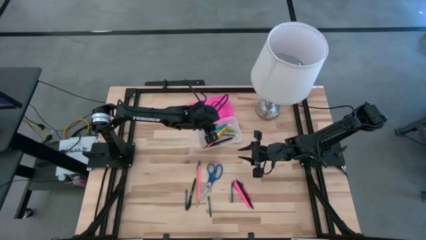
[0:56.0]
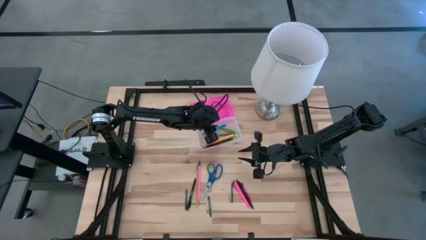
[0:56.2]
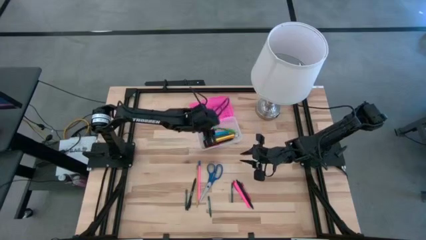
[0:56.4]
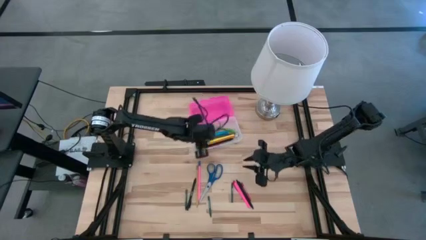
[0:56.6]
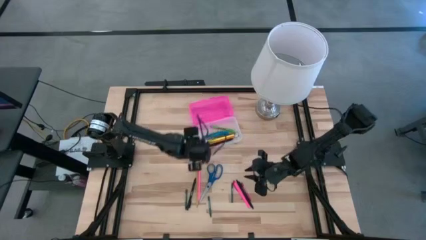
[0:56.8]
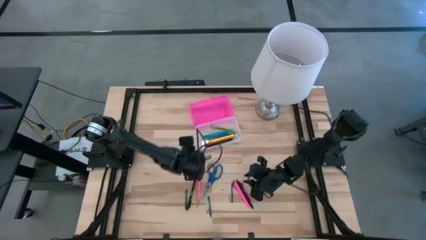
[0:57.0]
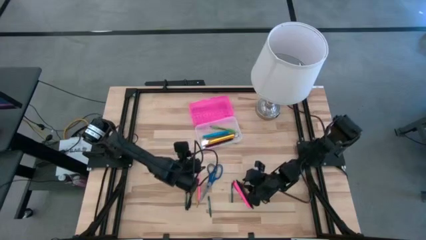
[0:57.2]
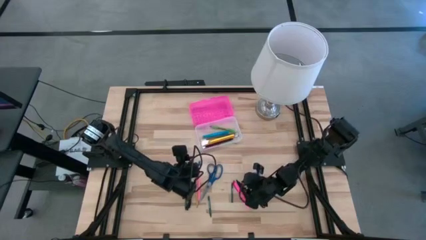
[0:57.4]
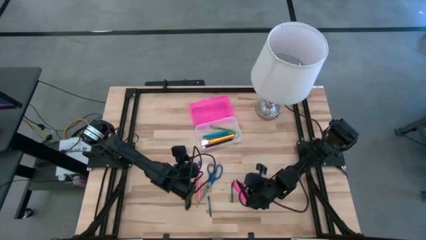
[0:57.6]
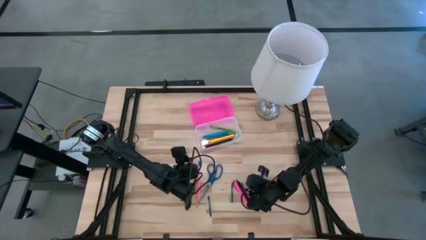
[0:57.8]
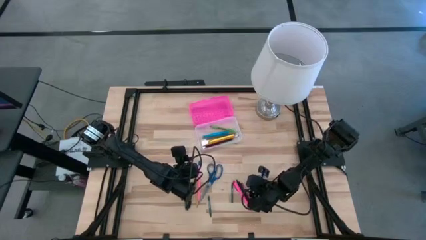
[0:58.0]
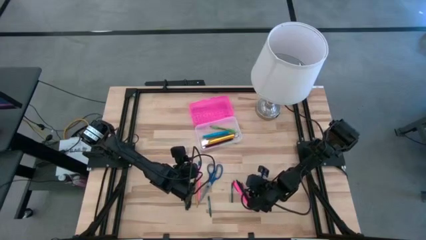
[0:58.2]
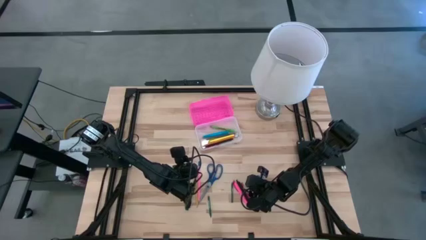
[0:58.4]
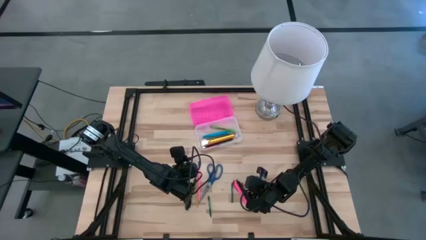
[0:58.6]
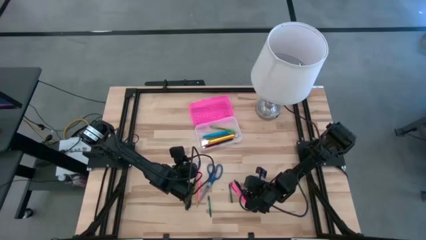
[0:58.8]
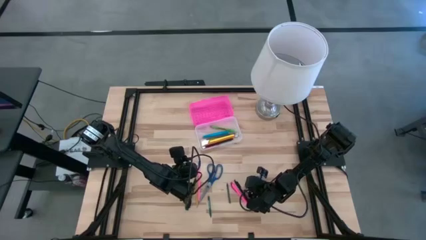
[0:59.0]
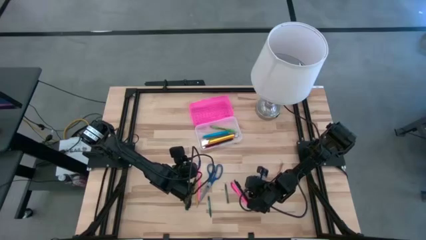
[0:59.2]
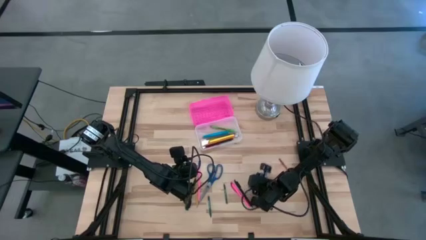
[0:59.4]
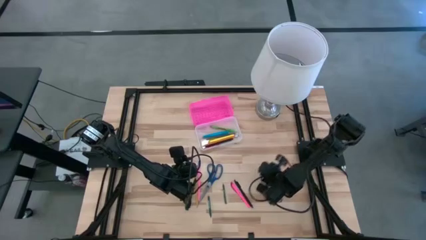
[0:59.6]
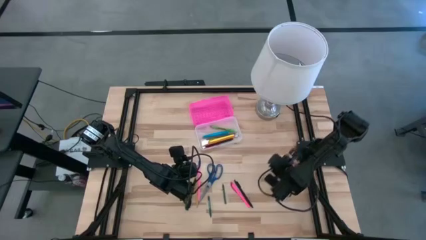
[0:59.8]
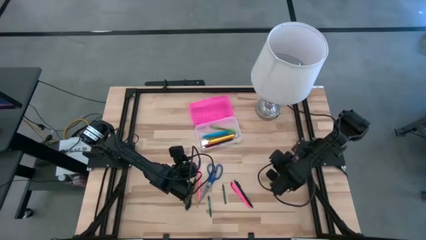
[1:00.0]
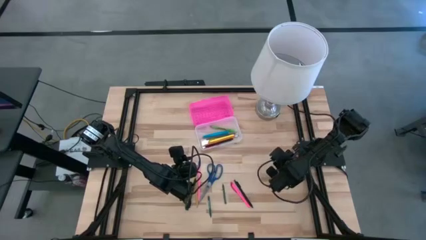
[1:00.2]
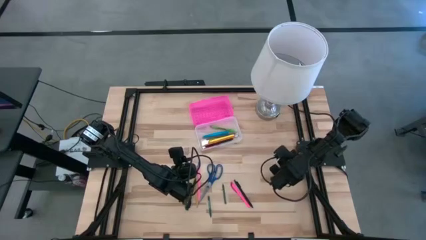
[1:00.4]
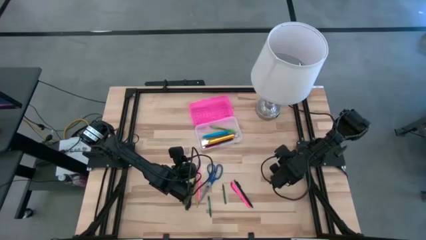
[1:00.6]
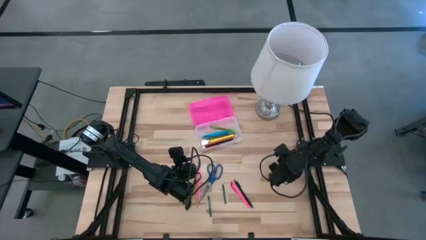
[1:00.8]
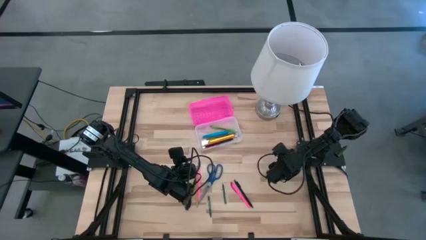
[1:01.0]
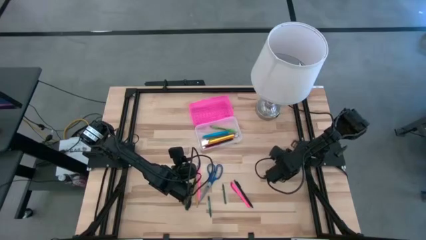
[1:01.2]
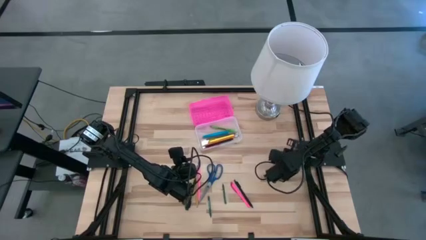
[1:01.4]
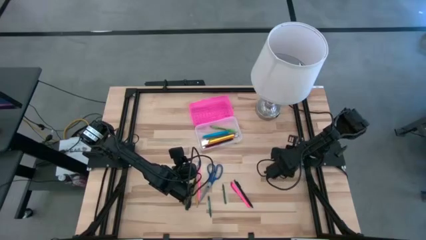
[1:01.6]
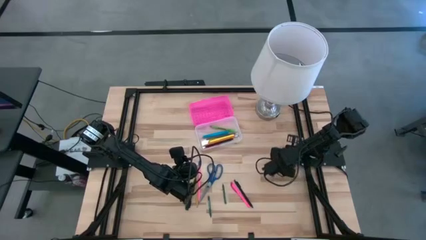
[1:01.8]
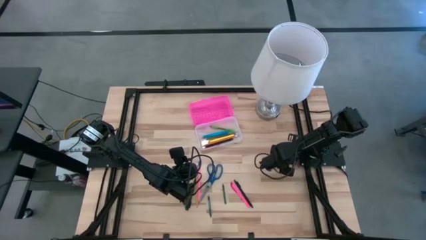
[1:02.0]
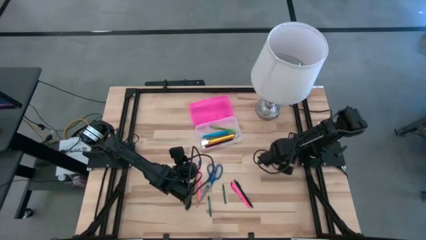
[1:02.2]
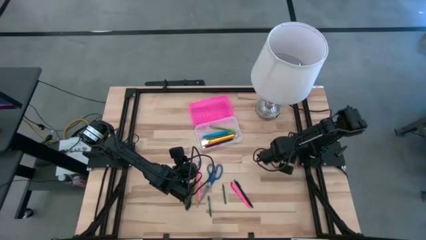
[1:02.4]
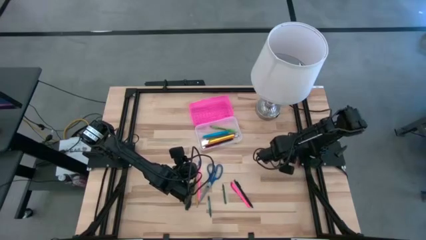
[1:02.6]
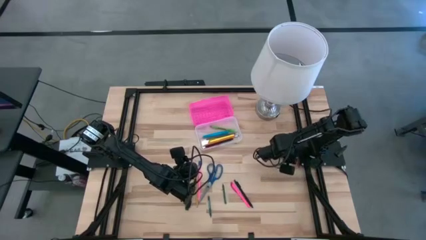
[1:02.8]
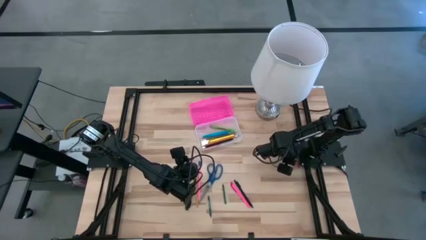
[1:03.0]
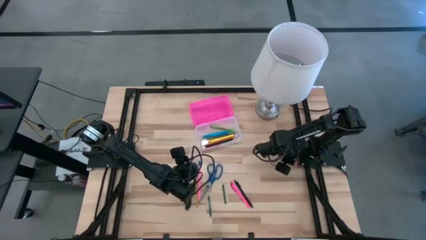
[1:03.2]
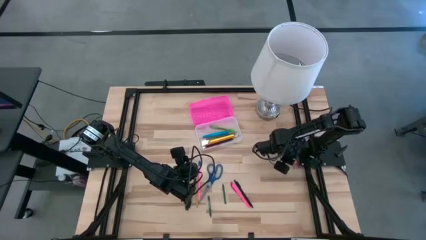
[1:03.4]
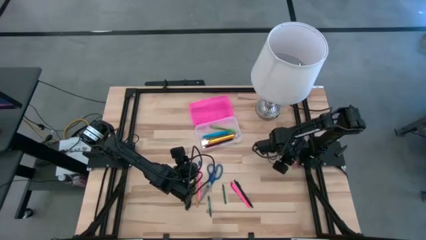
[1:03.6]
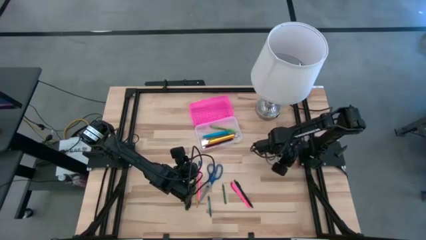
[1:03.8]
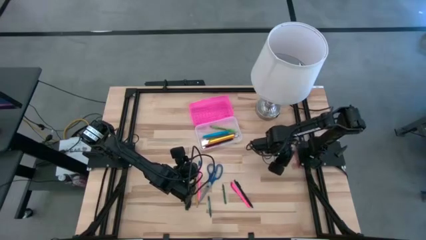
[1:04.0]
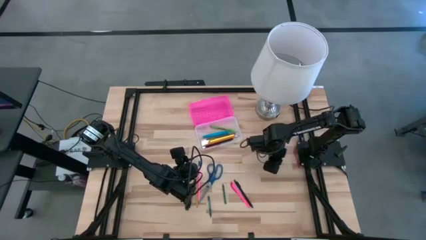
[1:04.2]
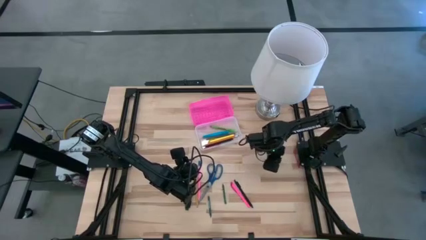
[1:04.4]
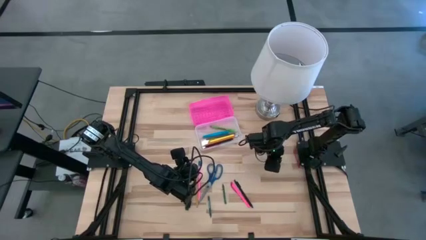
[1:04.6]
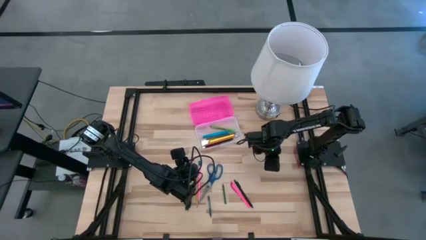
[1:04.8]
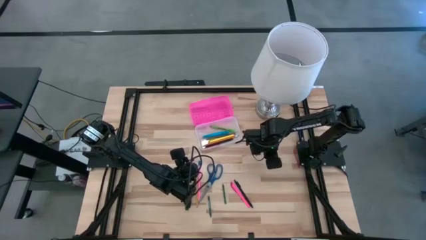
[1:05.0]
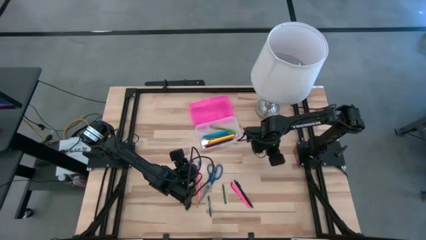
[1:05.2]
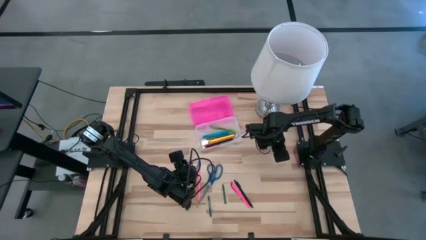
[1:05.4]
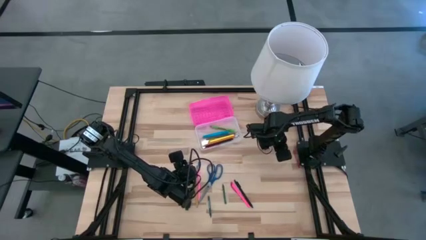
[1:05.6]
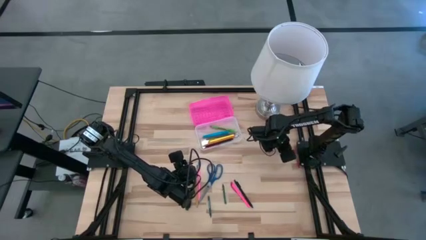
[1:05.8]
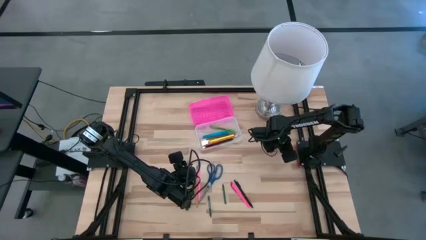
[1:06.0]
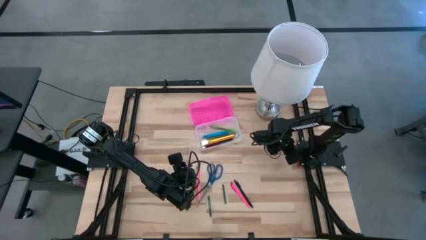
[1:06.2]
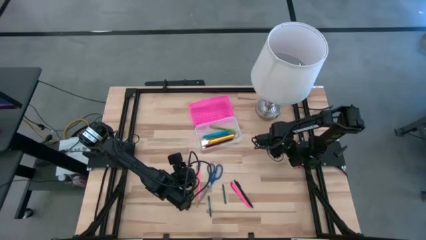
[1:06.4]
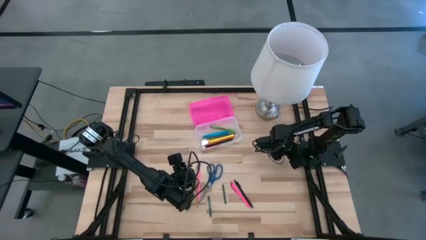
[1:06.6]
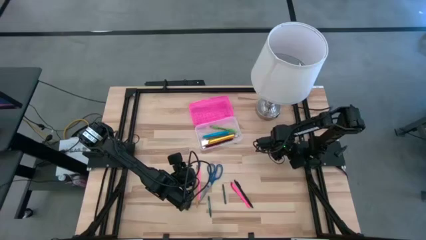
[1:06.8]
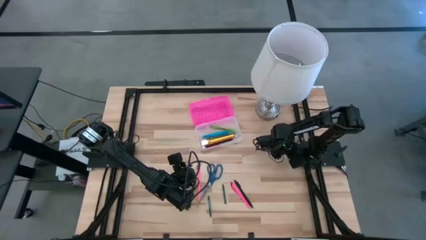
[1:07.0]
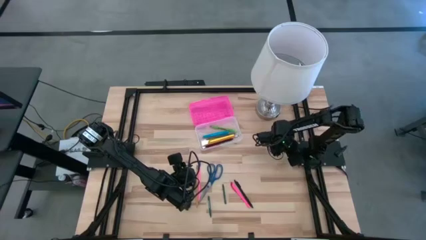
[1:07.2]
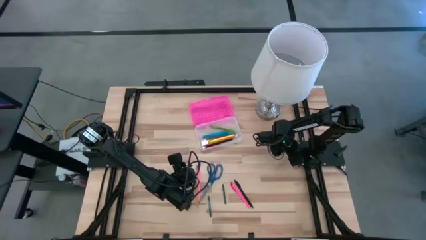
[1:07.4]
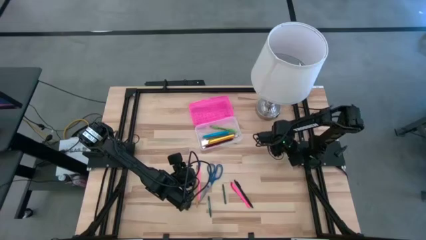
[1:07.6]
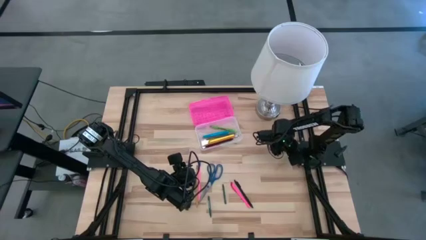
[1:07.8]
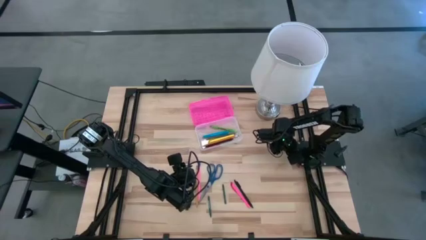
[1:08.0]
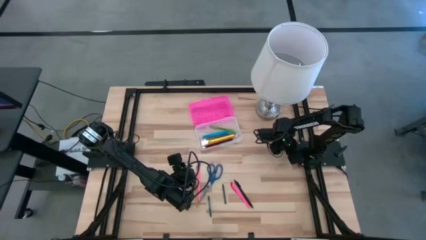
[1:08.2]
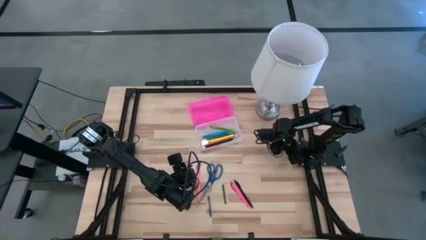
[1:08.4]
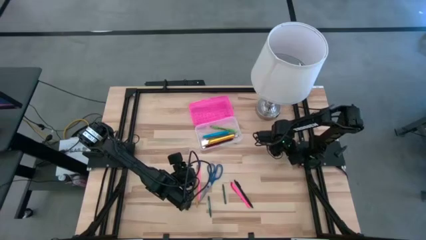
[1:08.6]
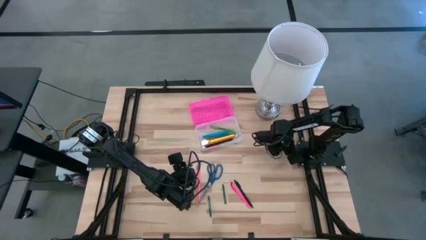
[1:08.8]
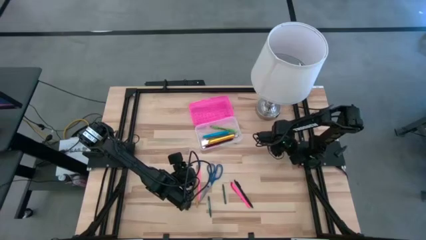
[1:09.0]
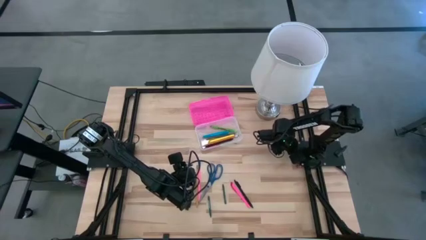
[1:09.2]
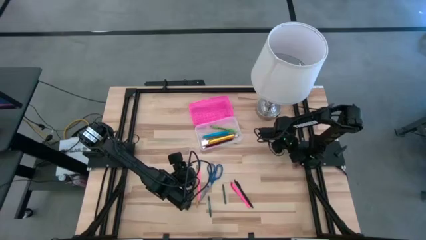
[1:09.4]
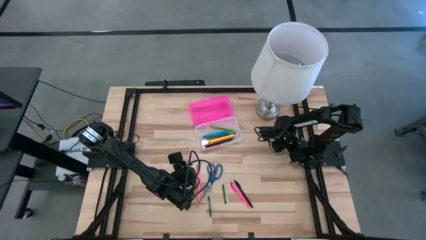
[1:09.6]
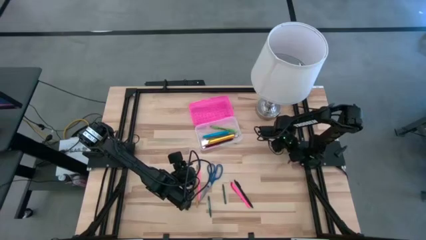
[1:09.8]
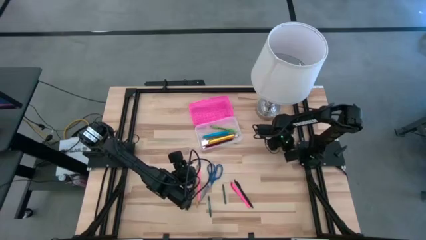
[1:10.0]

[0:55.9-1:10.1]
Task: Pick & place school supplies into a supply box
Put the red crayon into the pink supply box
